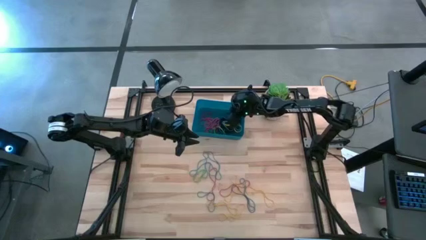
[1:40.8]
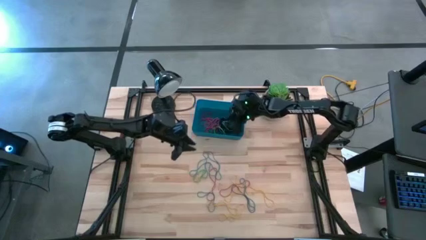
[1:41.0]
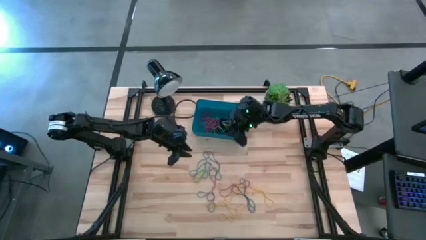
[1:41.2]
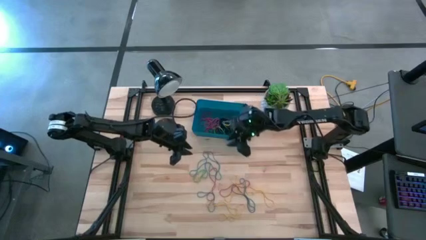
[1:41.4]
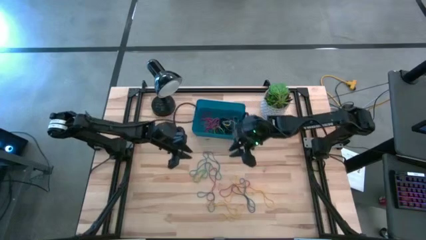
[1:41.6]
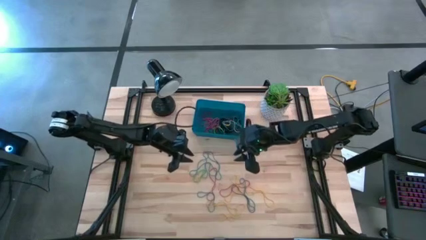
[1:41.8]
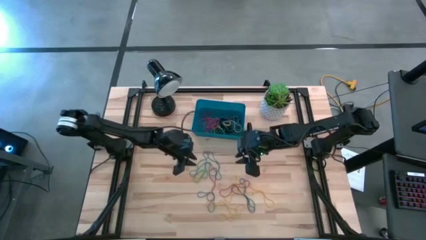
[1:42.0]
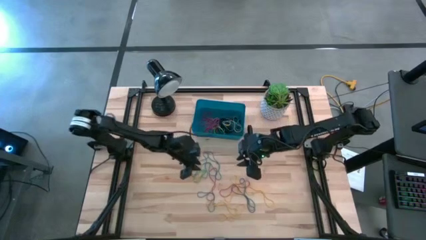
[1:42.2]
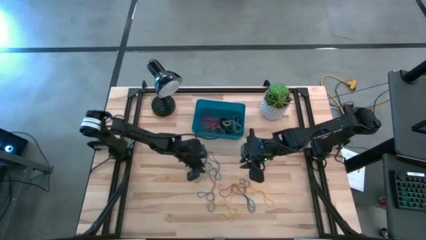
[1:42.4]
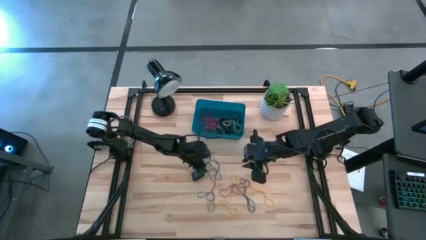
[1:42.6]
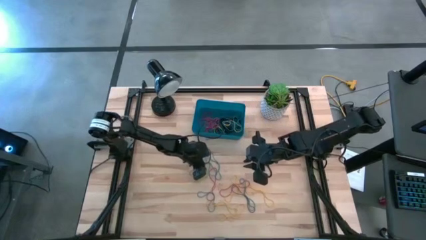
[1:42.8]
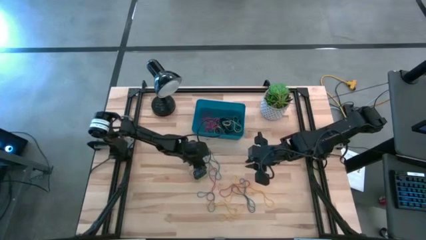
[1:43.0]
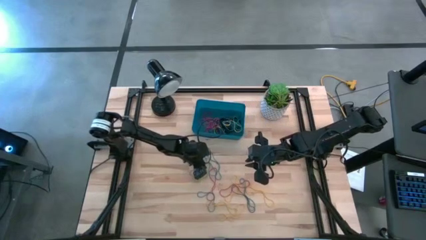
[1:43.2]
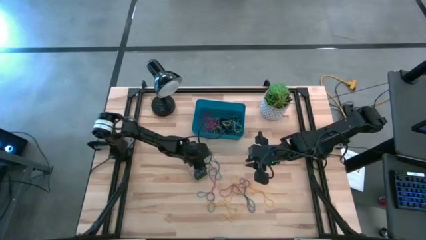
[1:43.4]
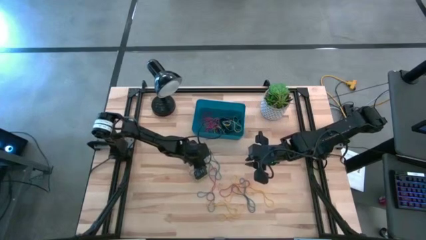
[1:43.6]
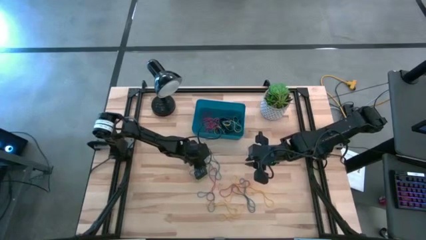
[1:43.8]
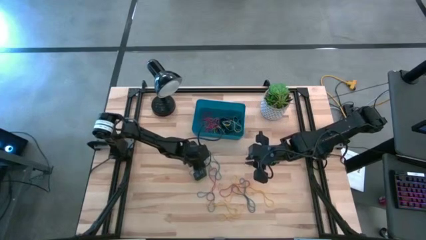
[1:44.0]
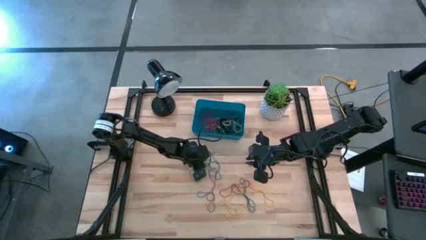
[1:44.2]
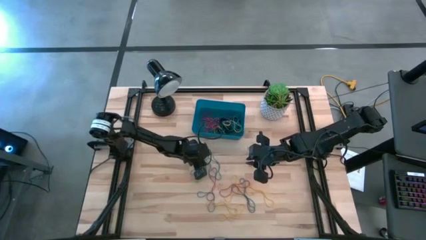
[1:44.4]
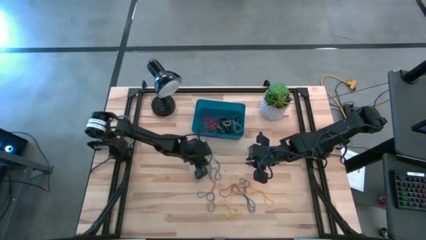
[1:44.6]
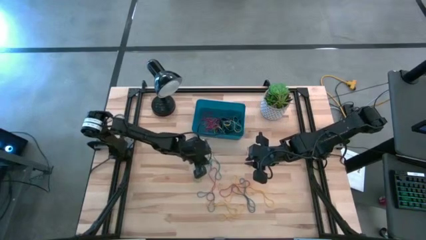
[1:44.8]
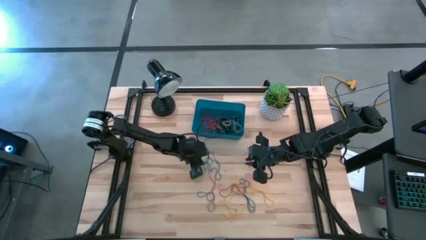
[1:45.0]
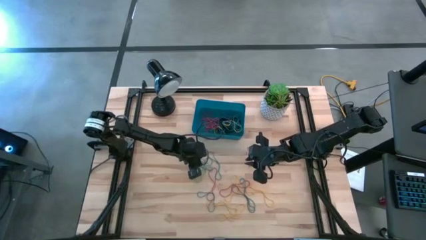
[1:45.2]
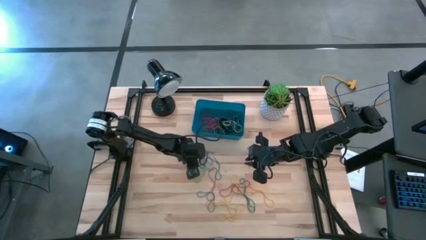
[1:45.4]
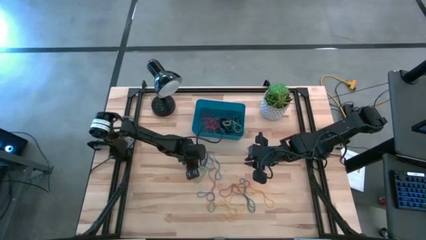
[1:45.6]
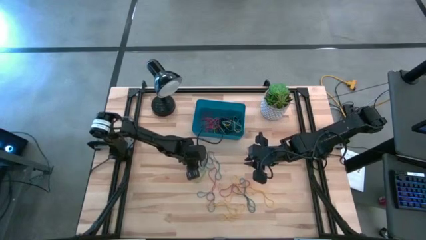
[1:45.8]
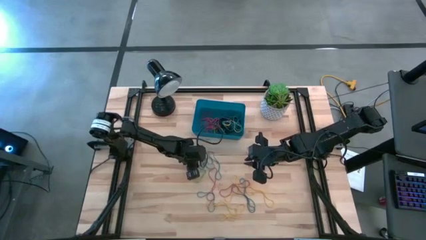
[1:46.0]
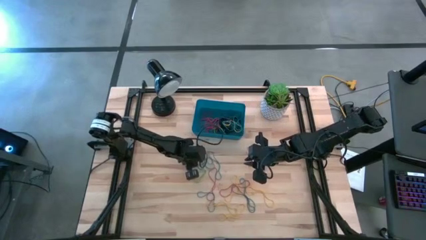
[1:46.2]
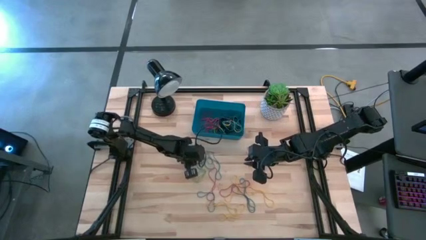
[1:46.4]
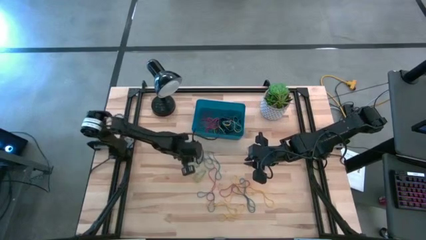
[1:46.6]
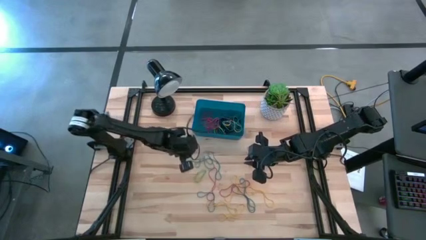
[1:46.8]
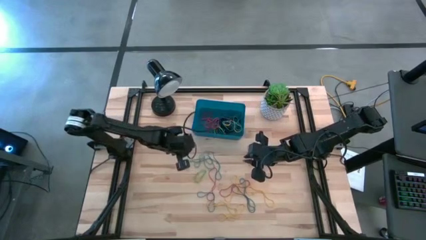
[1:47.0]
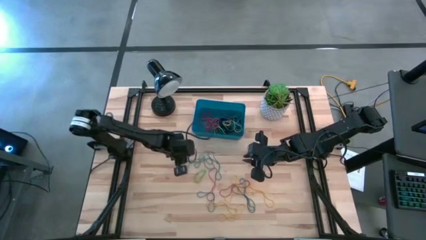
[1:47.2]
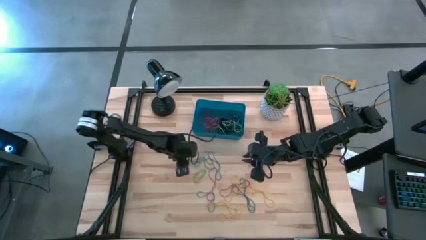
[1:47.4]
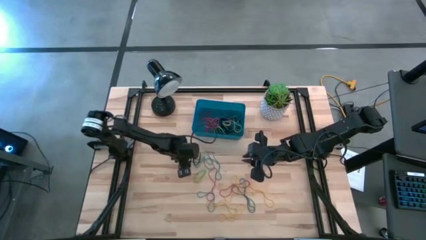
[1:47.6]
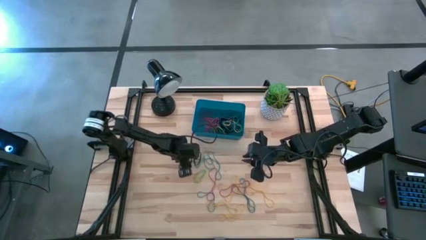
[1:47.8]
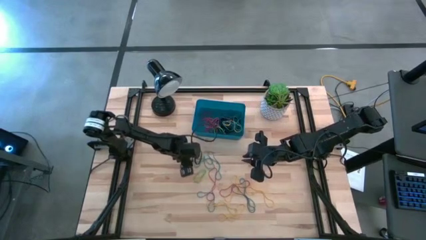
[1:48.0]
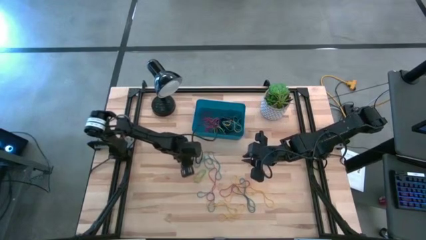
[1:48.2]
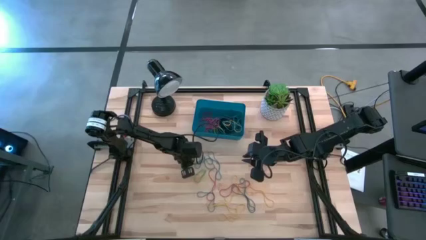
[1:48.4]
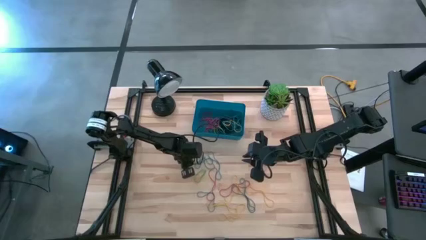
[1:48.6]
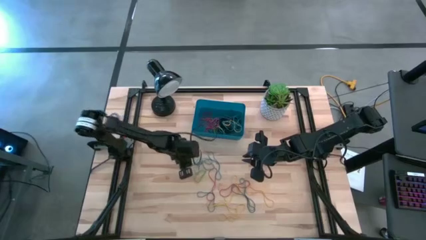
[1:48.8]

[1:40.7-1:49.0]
Task: Pick and place rubber bands into bin
Put the blue rubber band into the blue bin

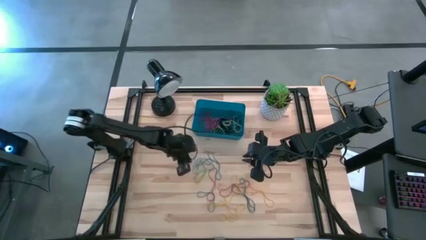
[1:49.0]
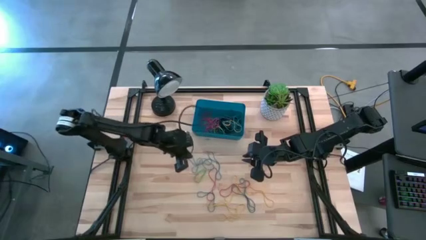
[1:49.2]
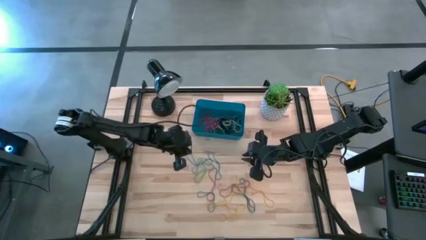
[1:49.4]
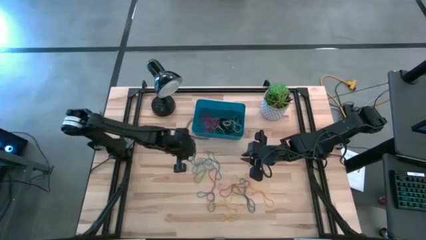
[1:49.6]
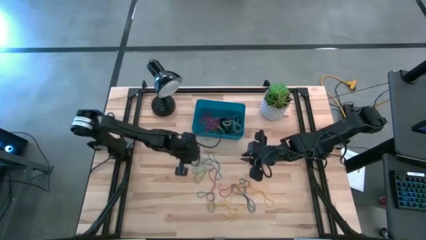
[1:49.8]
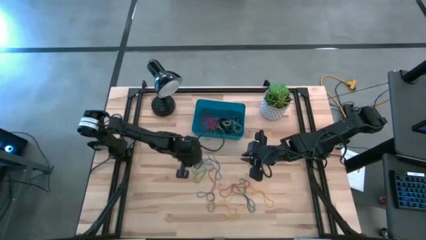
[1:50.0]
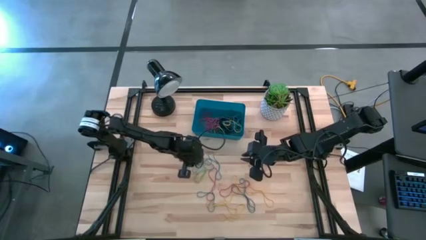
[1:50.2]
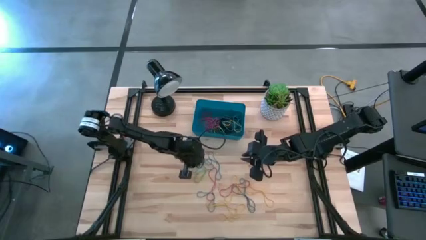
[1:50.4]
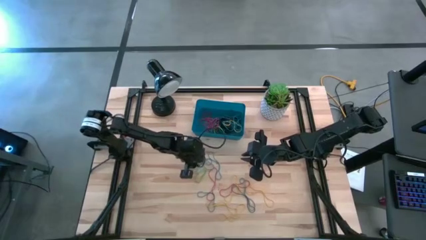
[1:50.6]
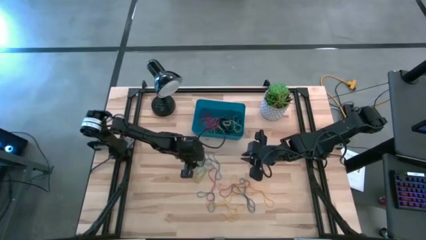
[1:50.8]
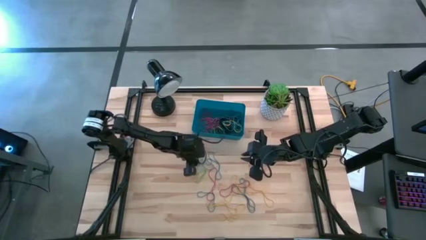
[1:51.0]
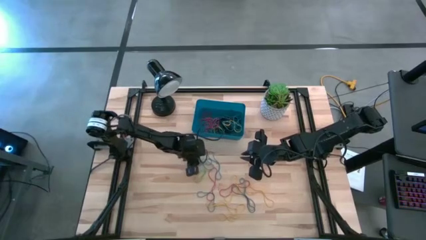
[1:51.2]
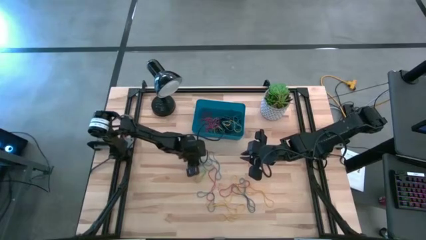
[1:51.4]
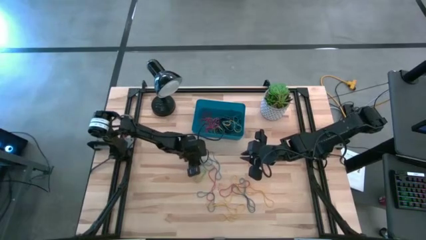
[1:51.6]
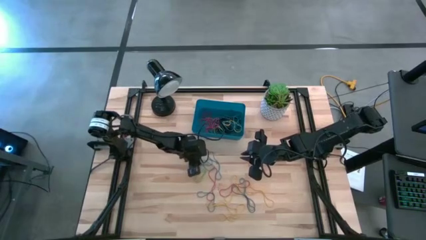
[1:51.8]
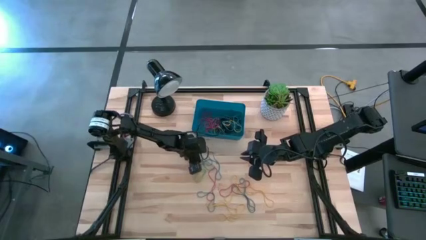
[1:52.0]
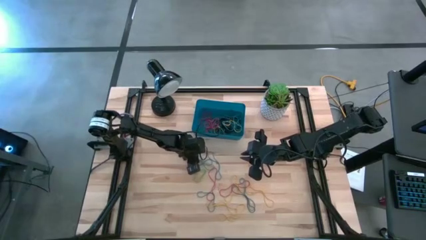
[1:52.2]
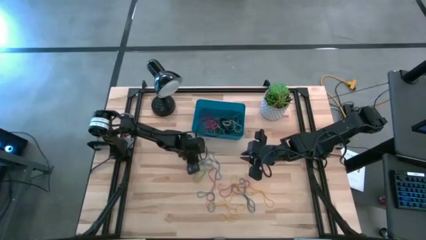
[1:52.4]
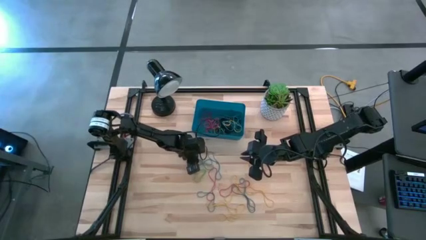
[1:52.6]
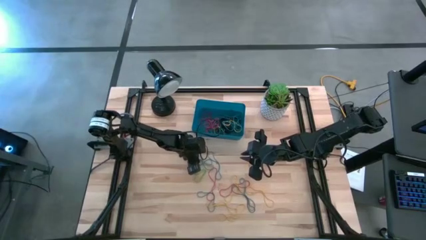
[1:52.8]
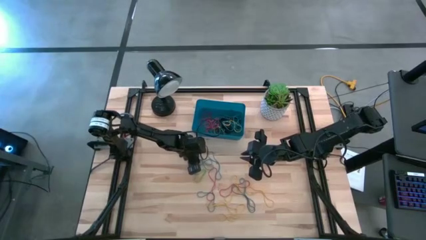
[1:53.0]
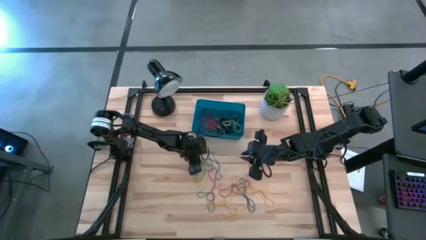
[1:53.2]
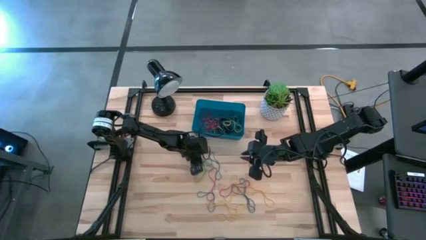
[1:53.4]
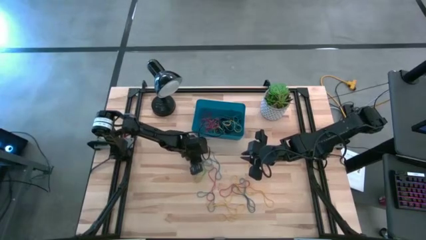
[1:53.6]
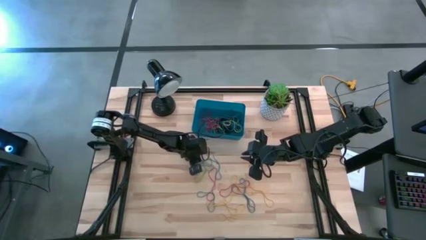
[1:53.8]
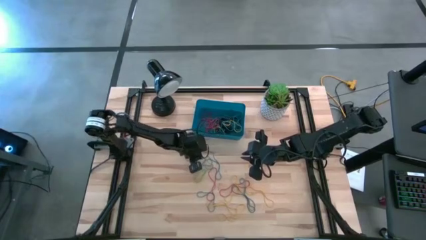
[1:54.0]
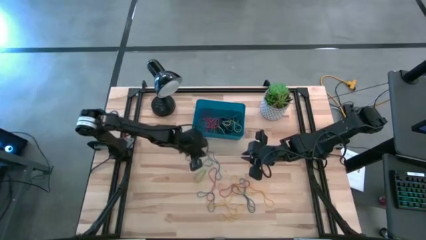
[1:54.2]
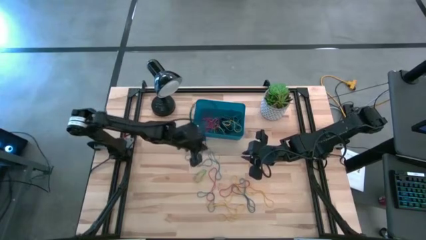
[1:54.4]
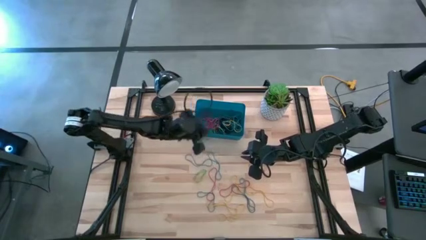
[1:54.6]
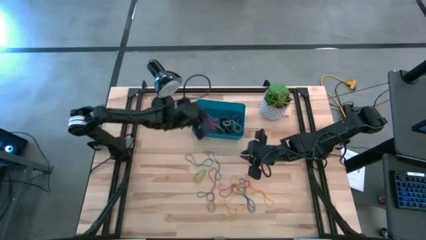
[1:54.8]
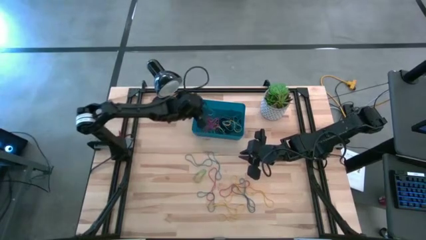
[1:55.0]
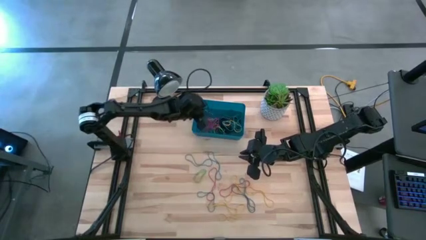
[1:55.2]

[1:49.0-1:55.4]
Put the blue rubber band into the blue bin

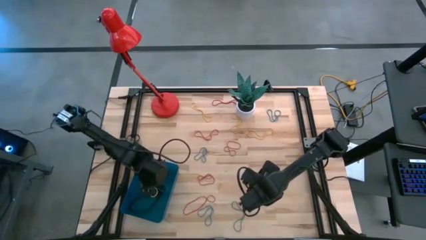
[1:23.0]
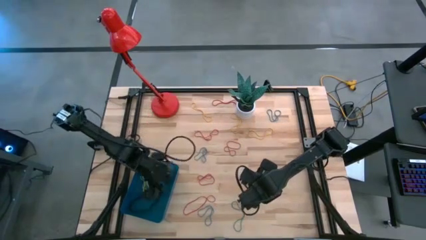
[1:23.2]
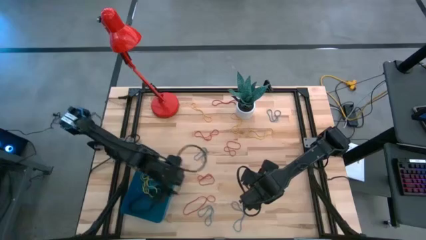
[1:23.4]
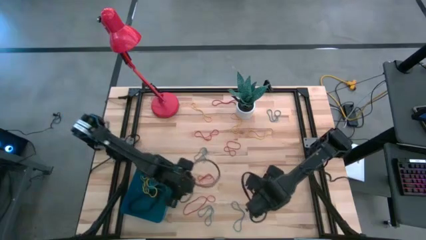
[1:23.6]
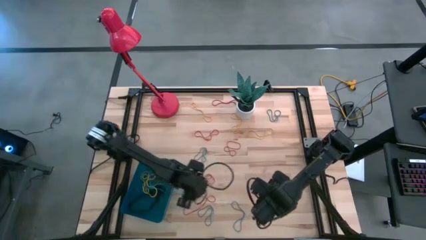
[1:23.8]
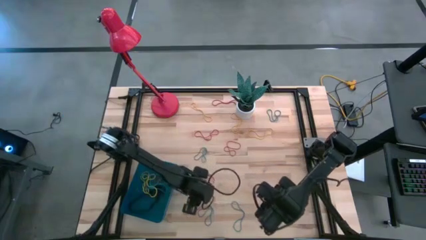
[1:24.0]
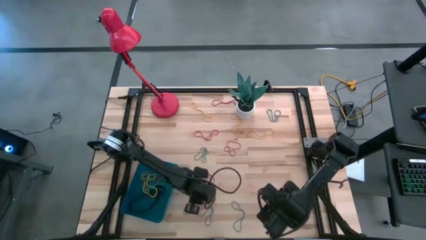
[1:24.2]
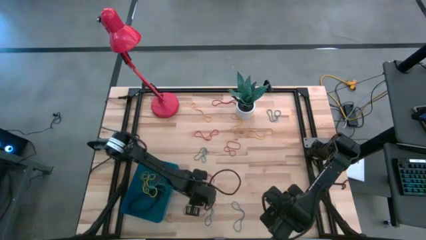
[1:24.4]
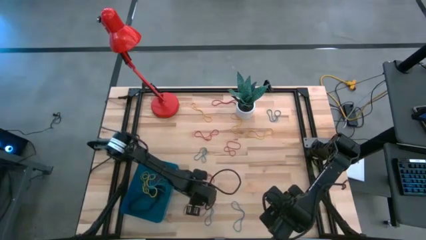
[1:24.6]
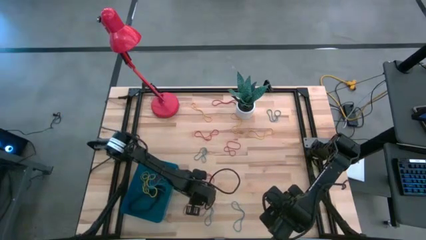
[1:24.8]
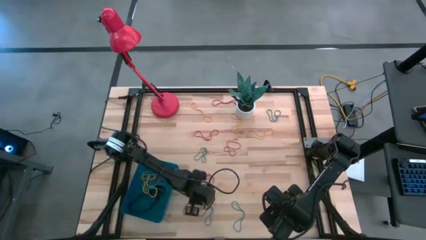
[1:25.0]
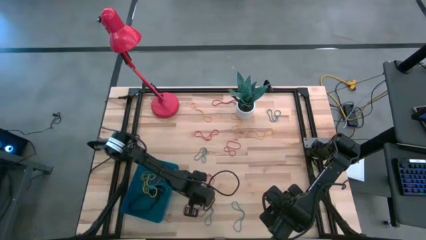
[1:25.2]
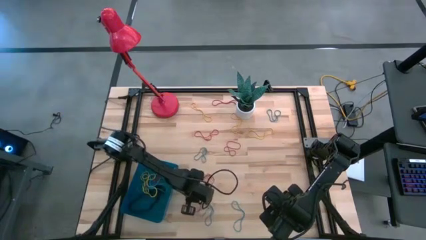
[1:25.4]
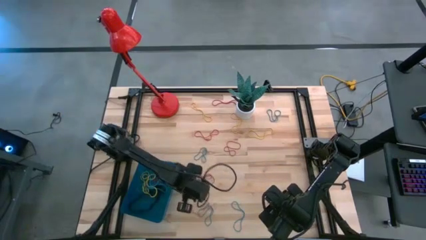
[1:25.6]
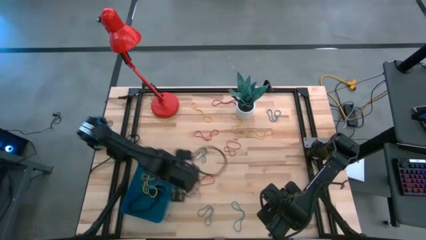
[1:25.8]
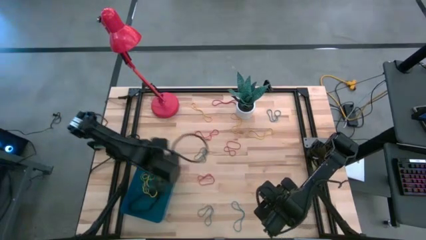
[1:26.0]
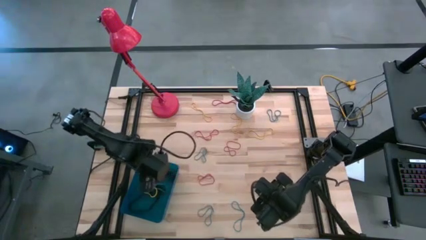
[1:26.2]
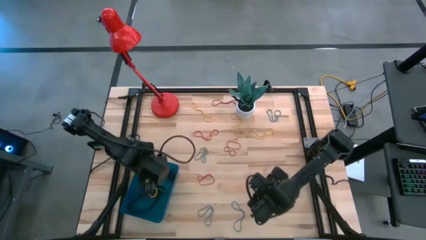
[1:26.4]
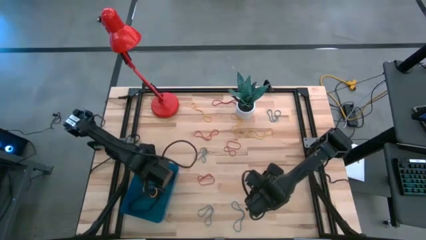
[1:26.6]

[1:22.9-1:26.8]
Task: Pick and place rubber bands into bin
Put the red rubber band into the blue bin
